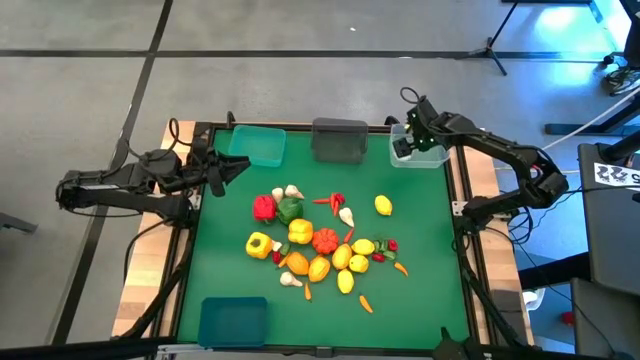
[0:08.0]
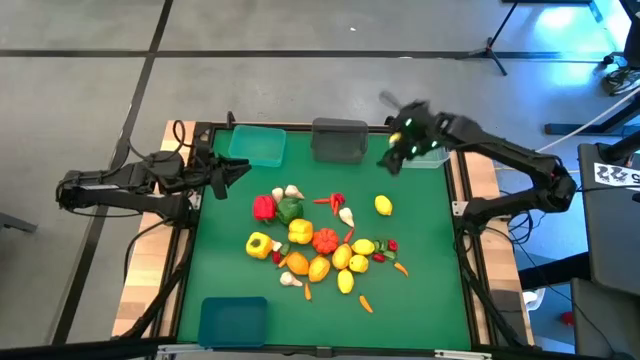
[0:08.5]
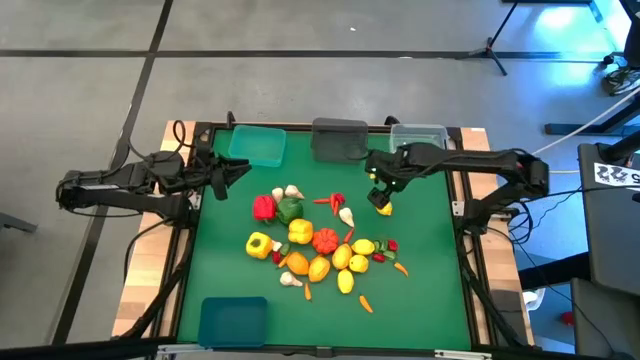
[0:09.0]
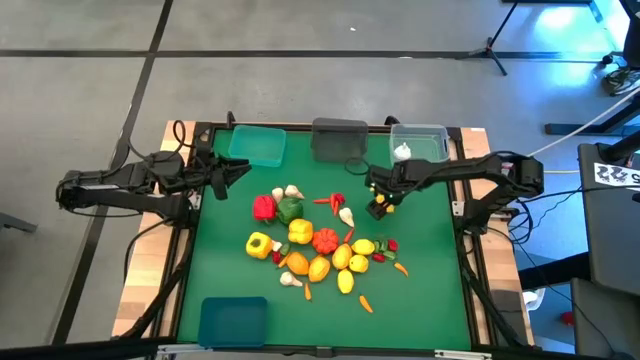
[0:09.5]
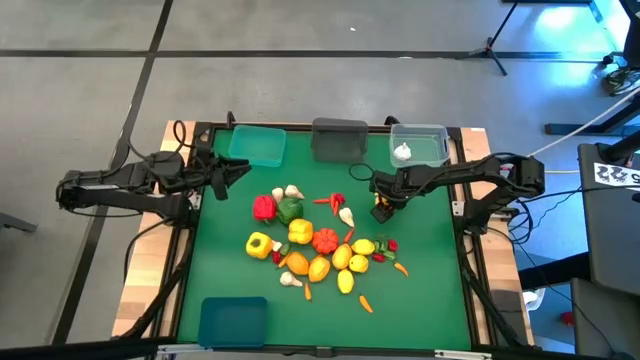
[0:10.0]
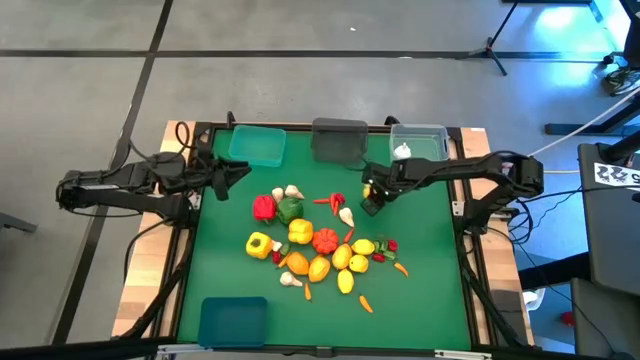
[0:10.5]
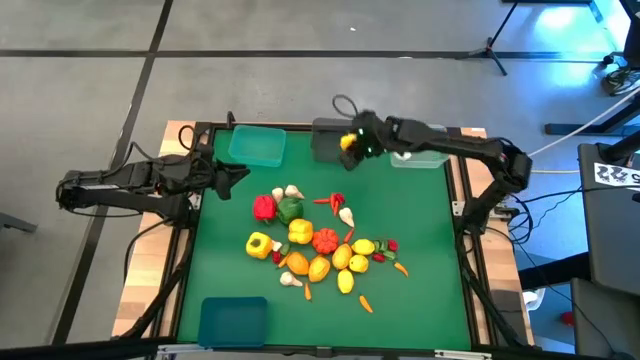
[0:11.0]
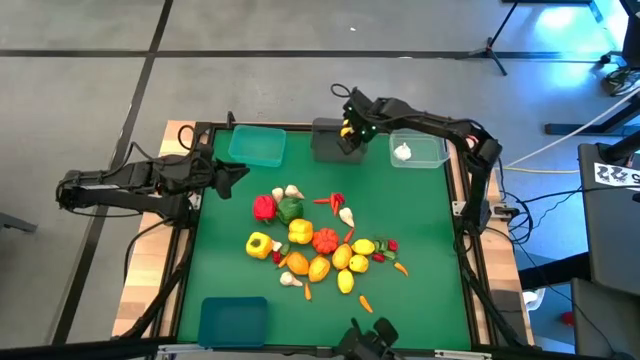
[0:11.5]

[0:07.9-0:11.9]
Task: Sort produce into baskets
Put the yellow lemon into the black bin

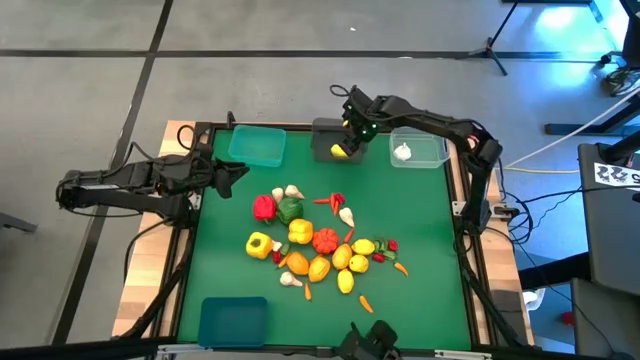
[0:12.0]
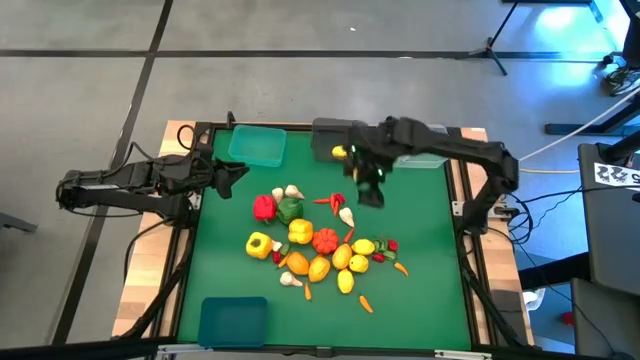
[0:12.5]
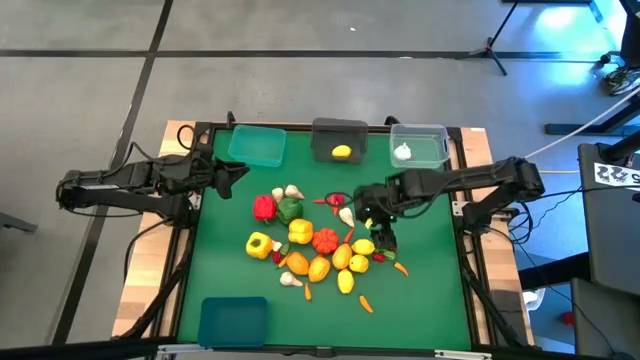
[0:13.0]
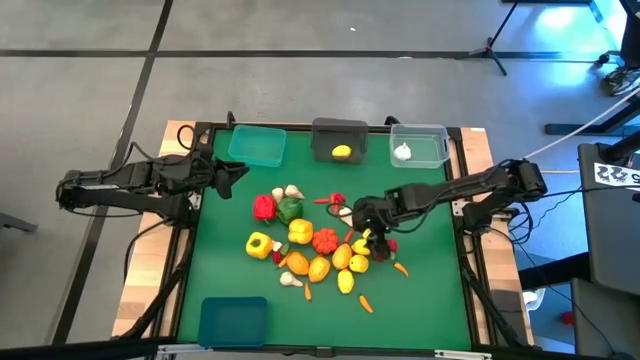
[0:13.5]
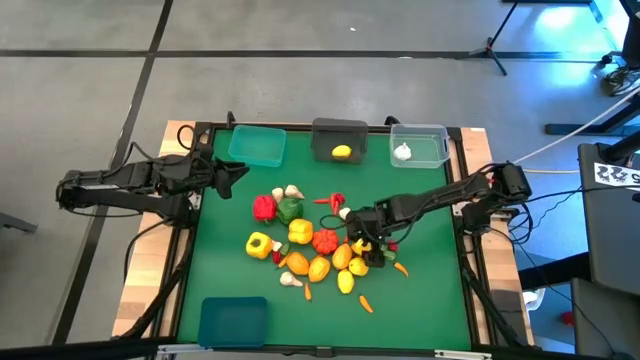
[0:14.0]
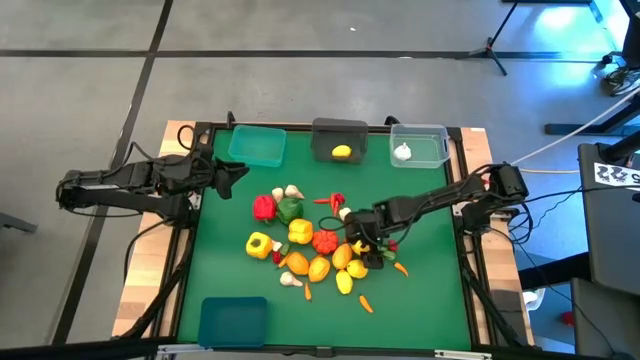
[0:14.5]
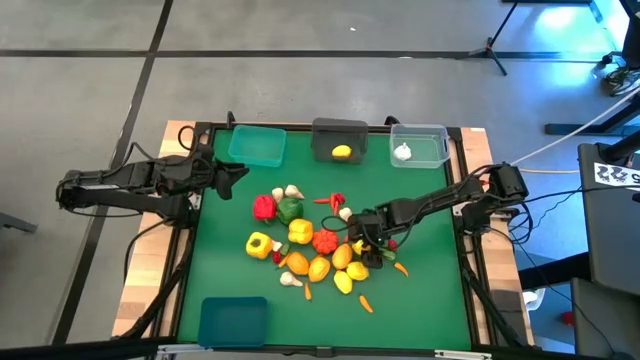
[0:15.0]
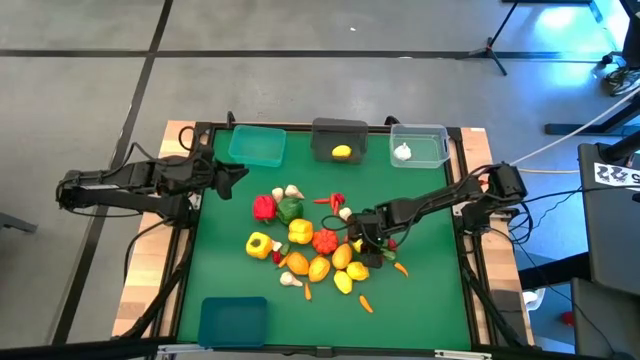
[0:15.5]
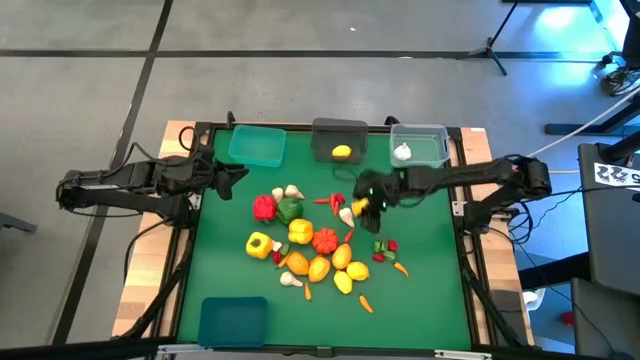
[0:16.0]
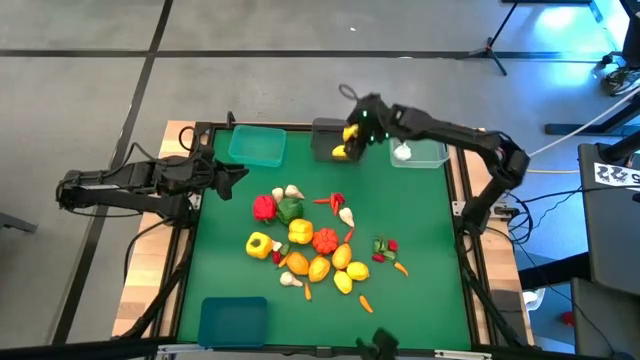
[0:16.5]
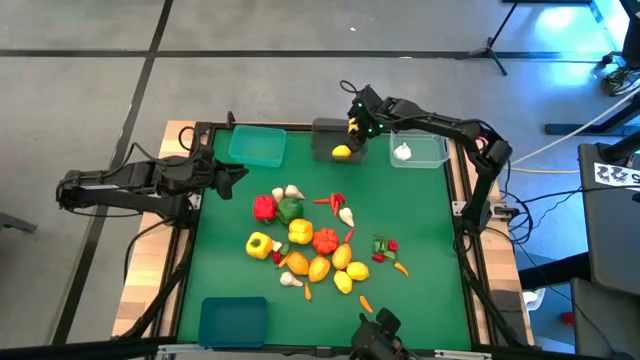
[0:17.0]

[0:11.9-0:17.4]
Put the yellow lemon into the black bin

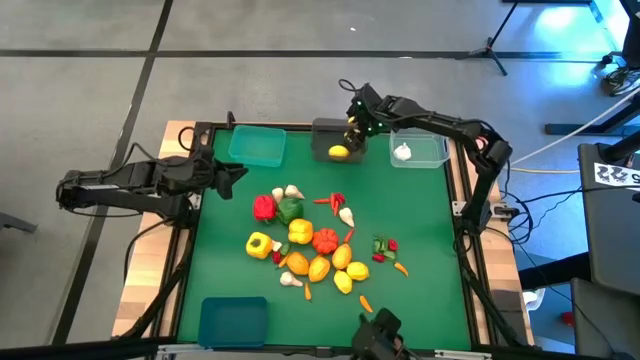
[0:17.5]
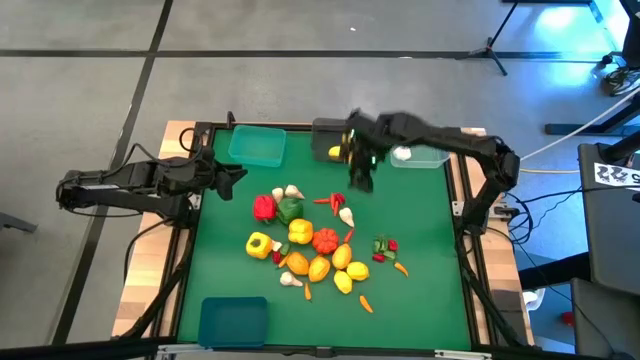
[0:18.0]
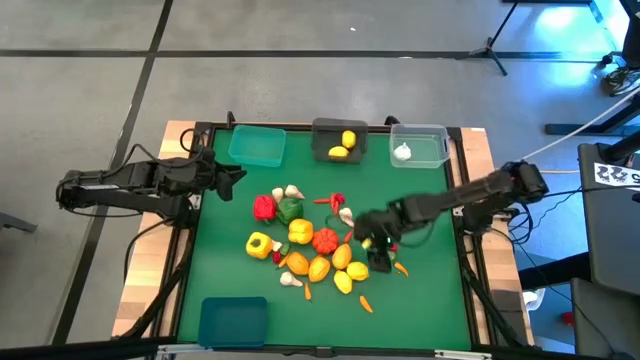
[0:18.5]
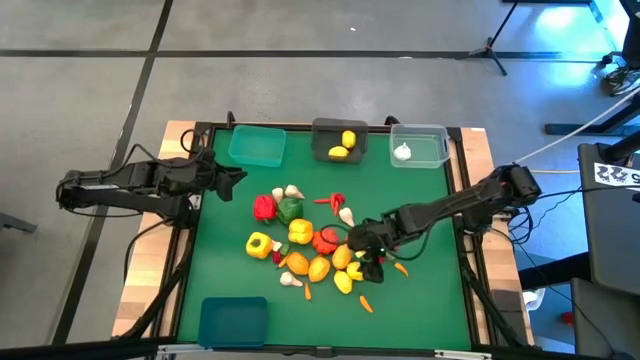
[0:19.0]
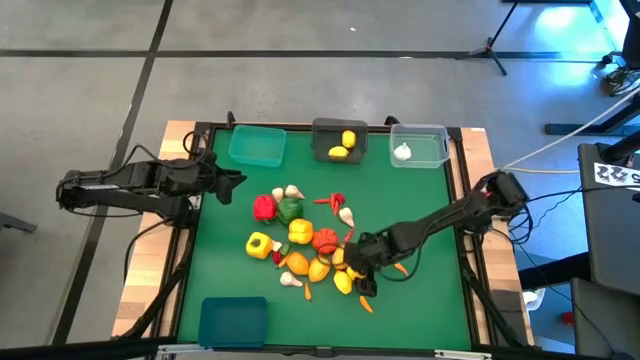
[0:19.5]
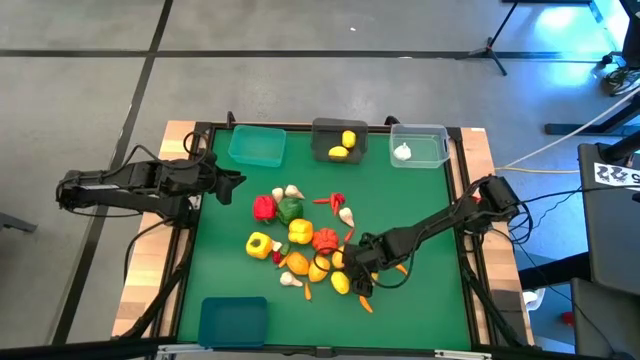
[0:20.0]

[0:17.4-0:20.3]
Put the yellow lemon into the black bin

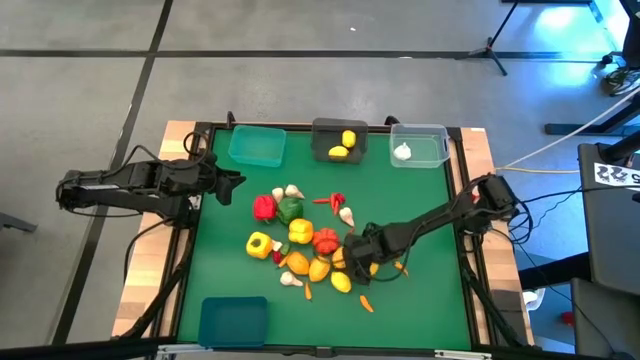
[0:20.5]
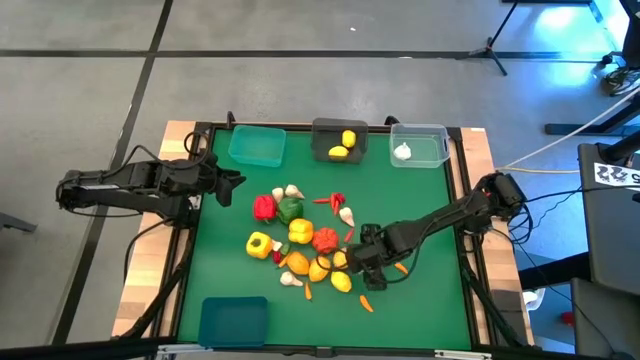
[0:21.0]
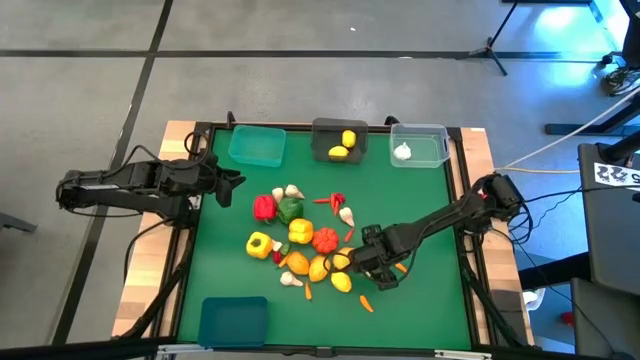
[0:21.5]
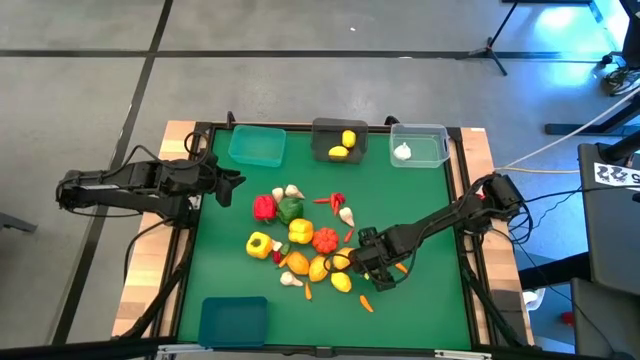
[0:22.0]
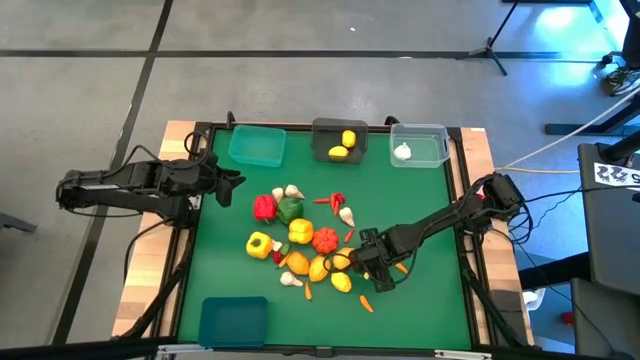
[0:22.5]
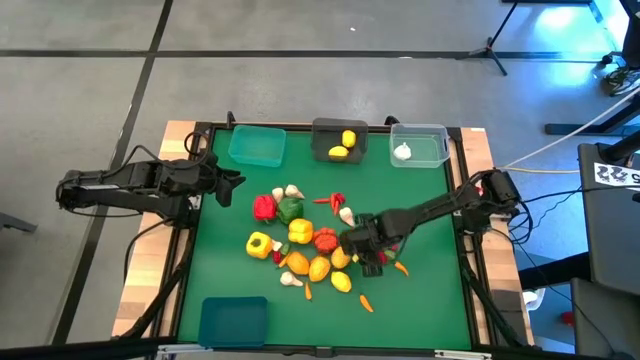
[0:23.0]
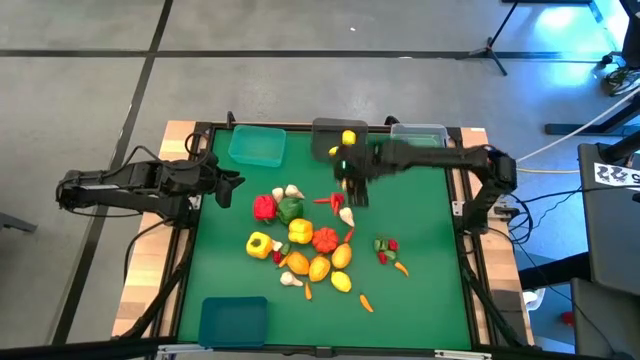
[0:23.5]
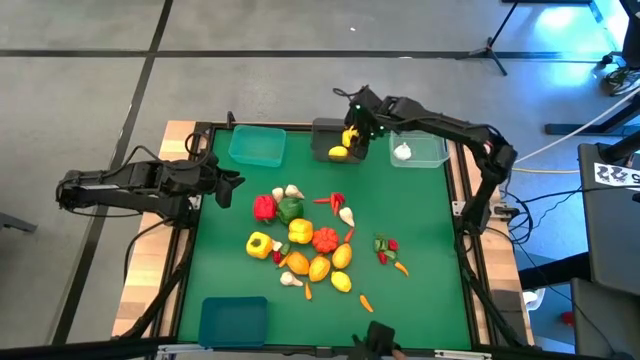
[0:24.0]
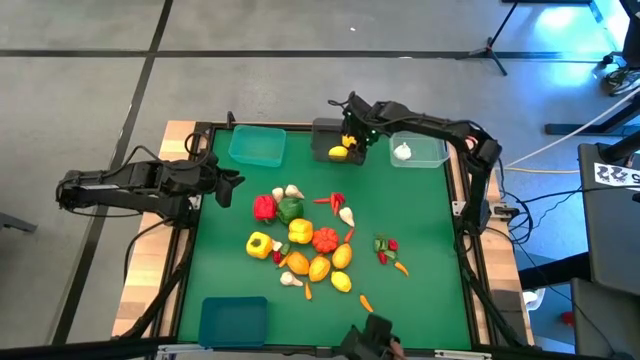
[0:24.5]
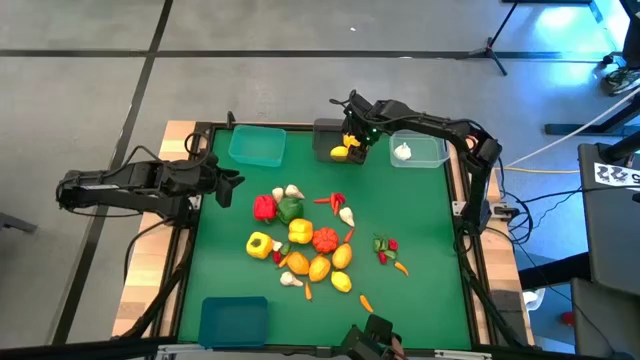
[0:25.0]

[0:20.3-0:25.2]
Put the yellow lemon into the black bin

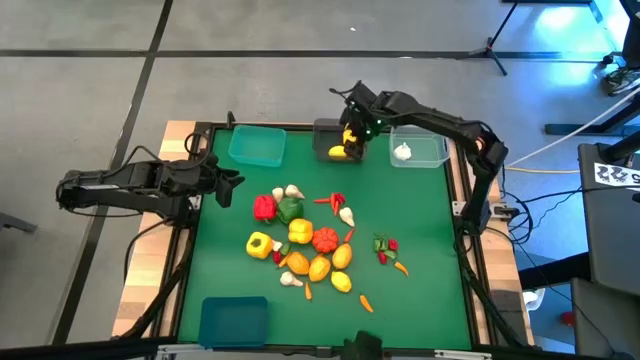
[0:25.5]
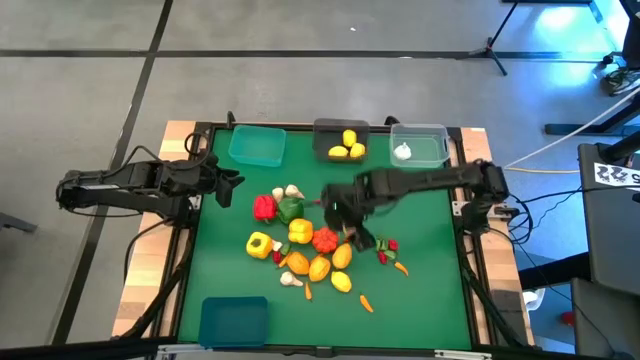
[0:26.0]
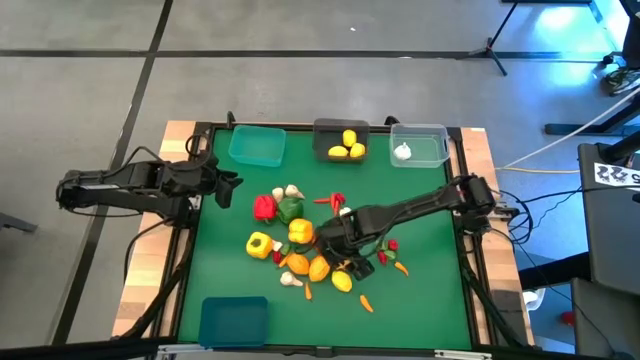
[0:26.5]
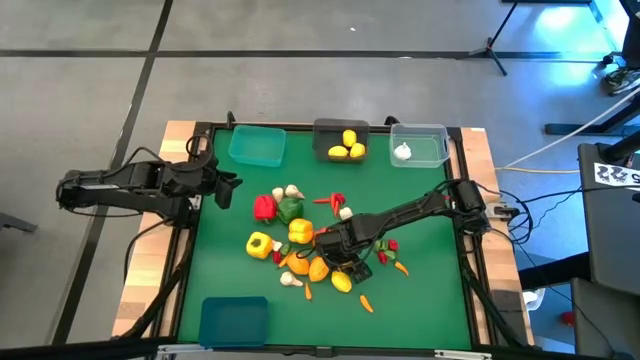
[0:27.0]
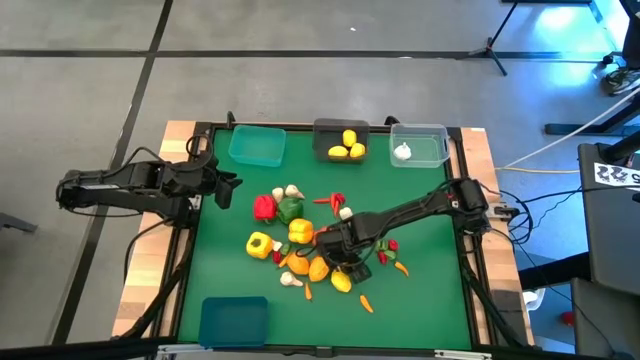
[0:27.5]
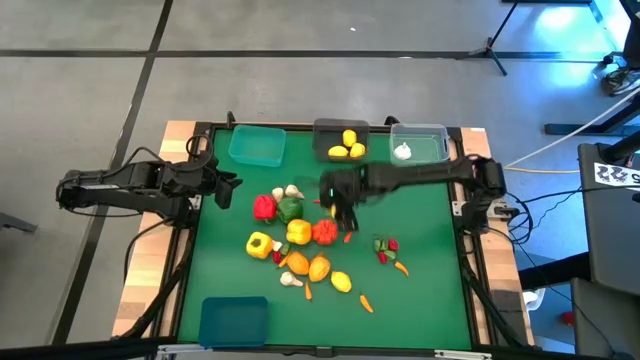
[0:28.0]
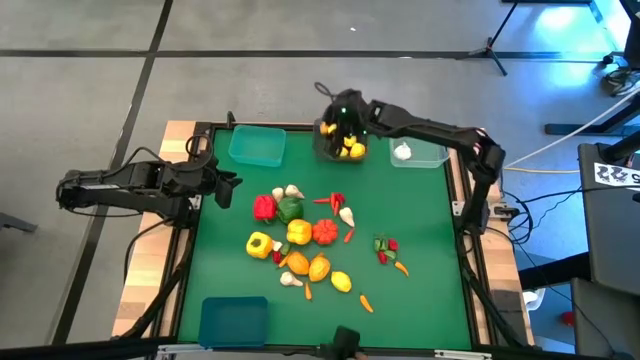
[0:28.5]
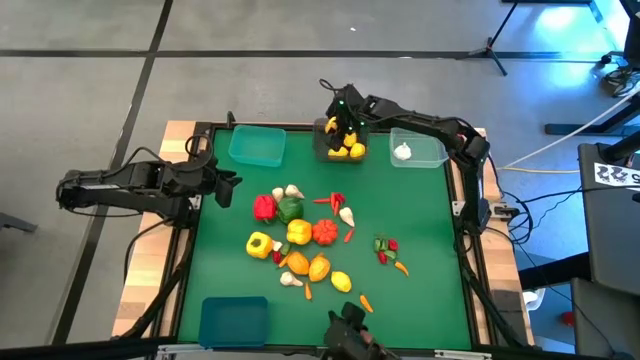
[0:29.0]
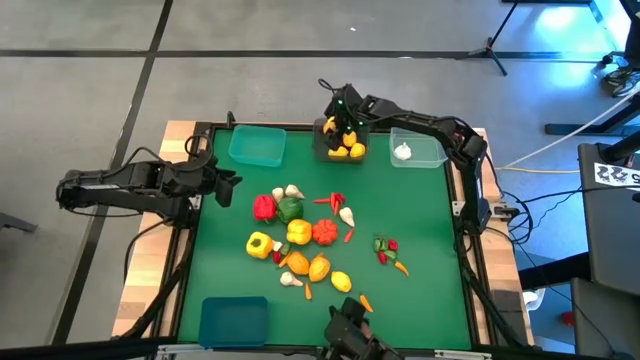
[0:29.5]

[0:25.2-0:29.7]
Put the yellow lemon into the black bin
